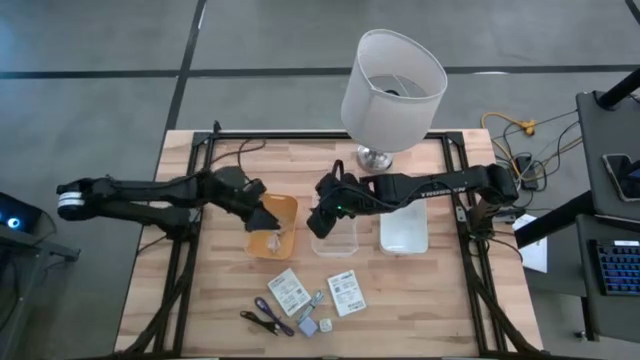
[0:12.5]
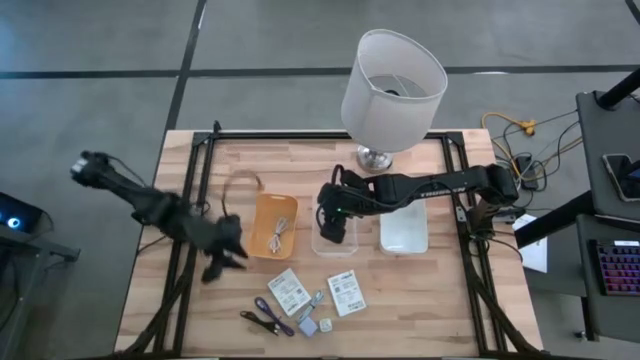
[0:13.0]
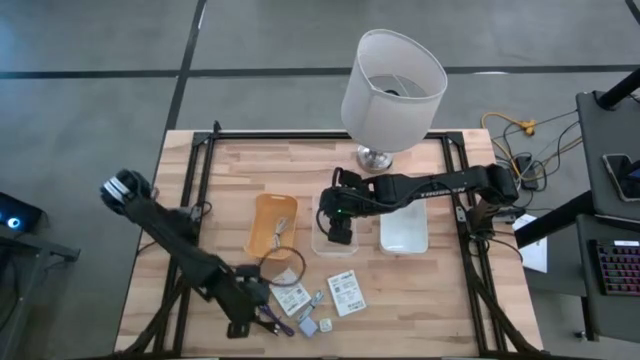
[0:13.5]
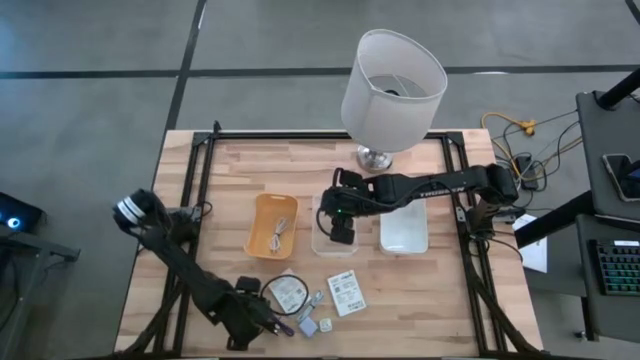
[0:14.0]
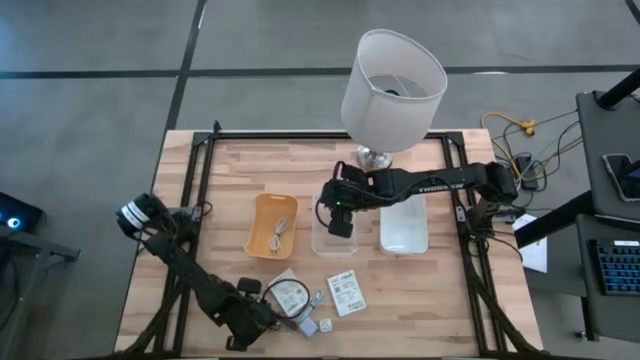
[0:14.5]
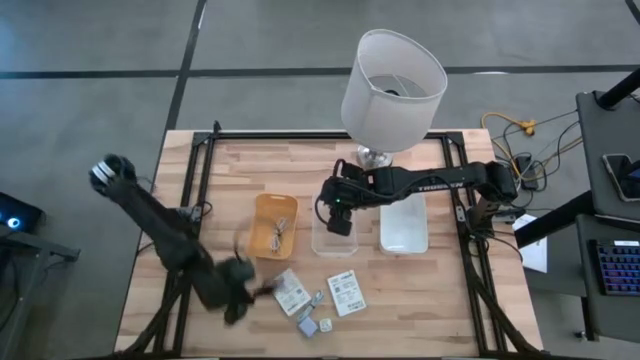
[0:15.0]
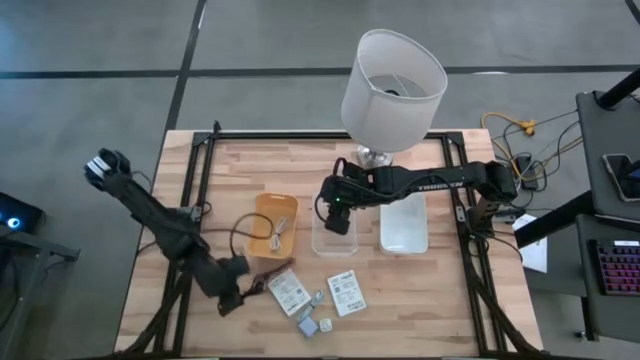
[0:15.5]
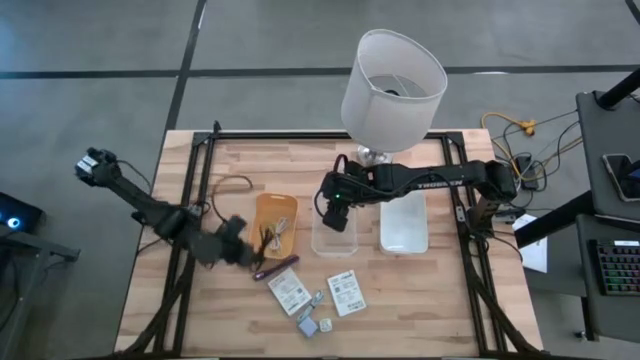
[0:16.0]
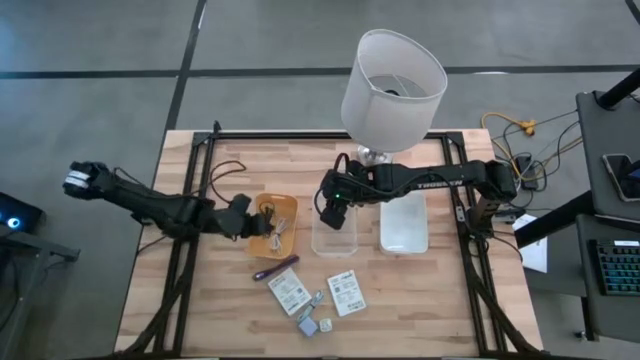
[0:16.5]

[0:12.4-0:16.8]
Task: Pick and place items into bin
Put the black charger cable into the yellow bin

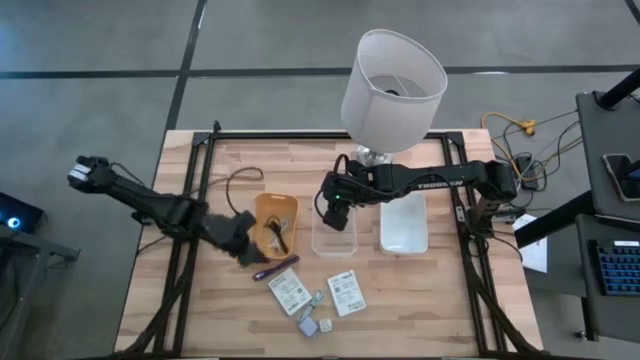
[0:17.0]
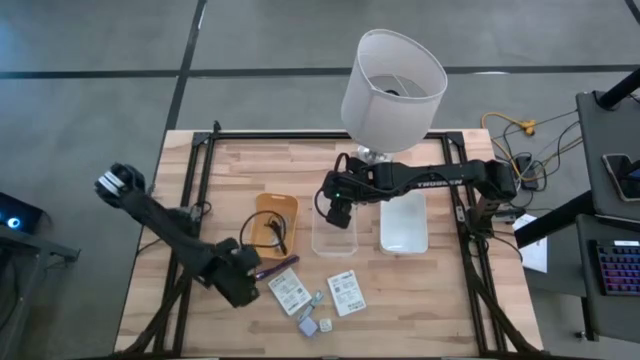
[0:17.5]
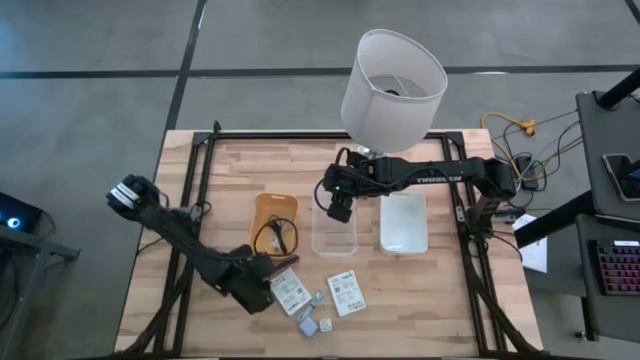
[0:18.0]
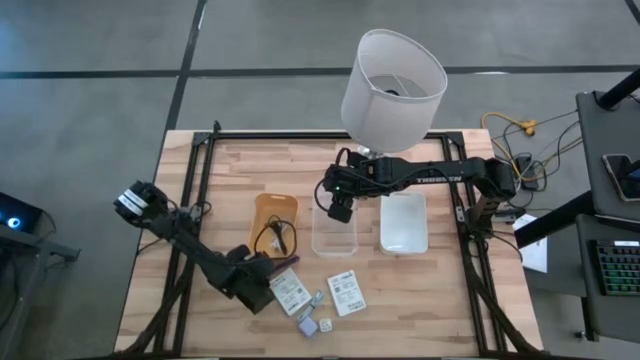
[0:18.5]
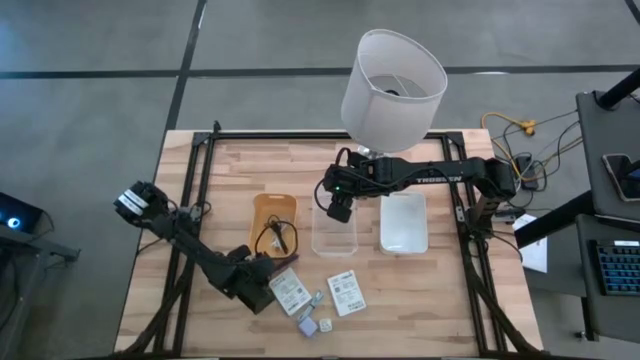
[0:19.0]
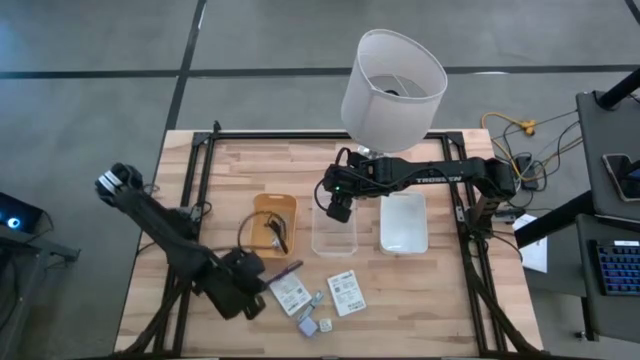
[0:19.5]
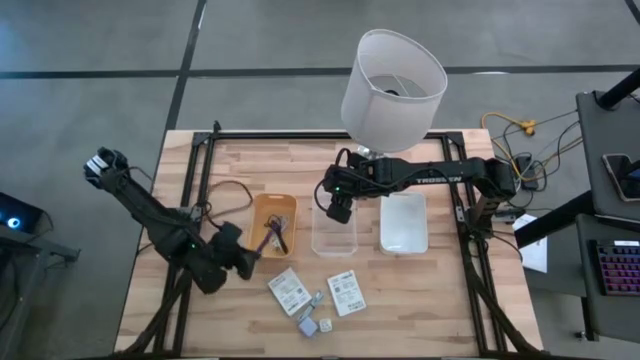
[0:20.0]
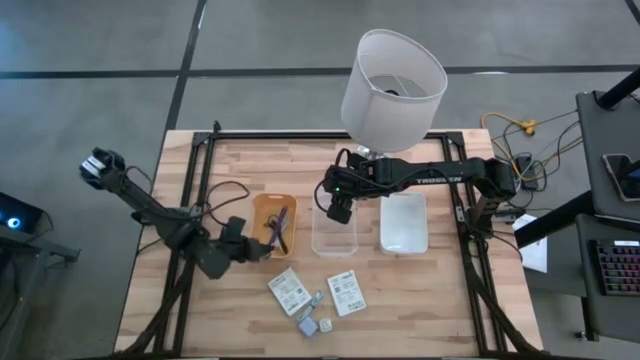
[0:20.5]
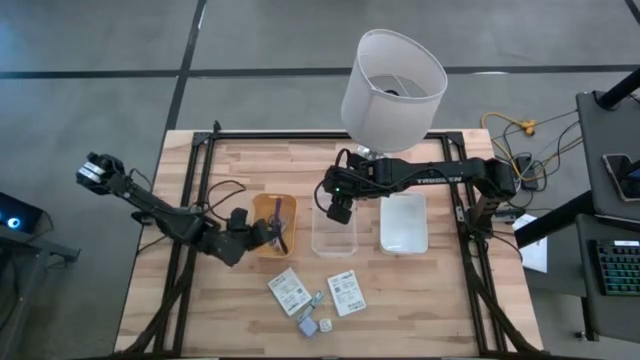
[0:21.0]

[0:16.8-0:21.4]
Put the blue charger cable into the yellow bin

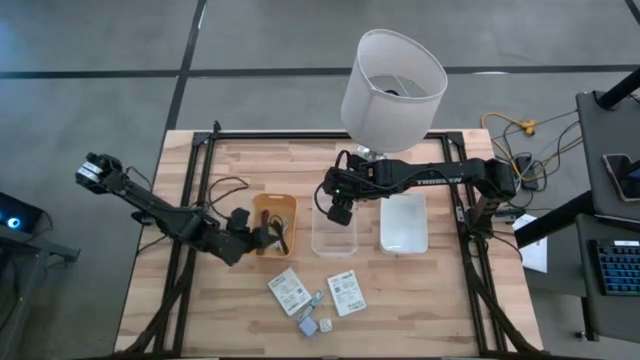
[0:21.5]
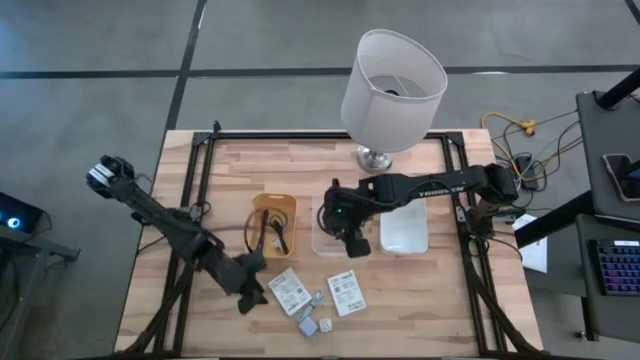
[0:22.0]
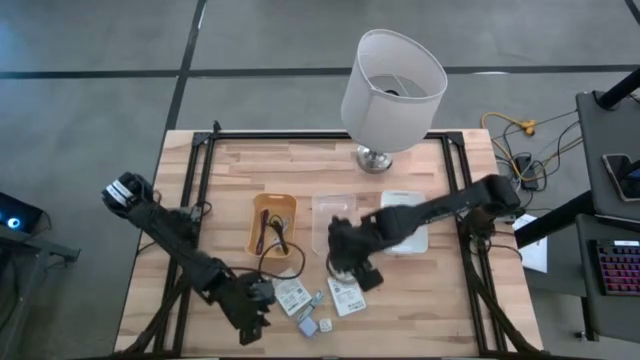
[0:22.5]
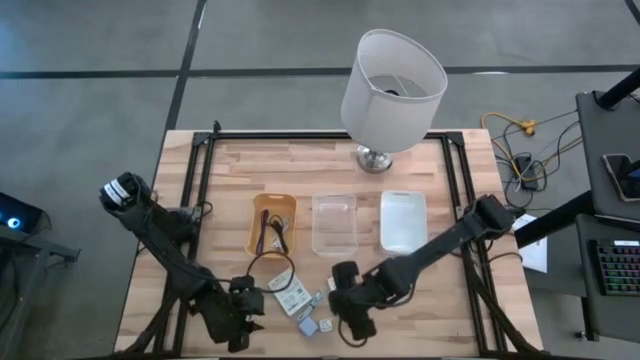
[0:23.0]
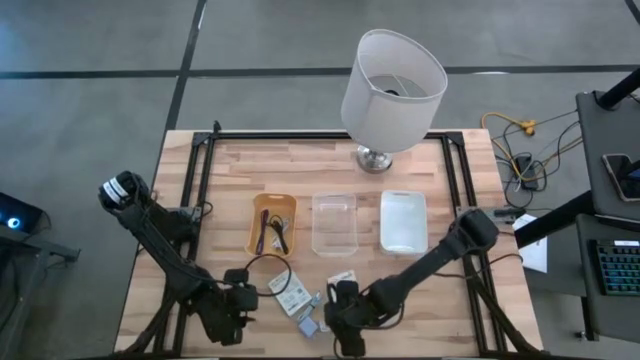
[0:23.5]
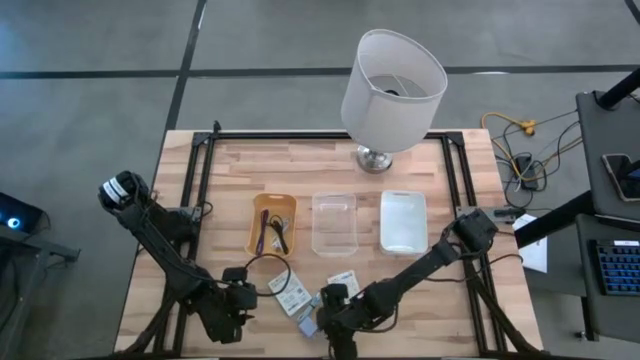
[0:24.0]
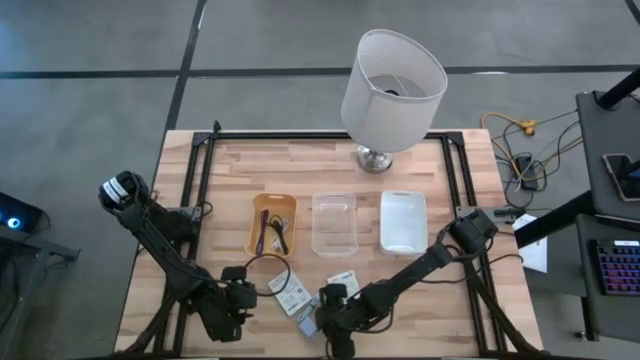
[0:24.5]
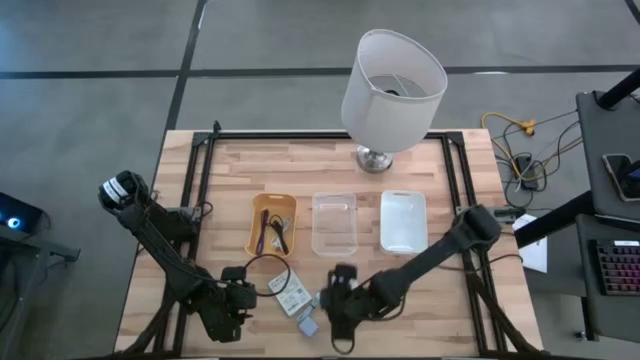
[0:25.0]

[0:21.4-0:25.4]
Put the green charger adapter into the white transparent bin

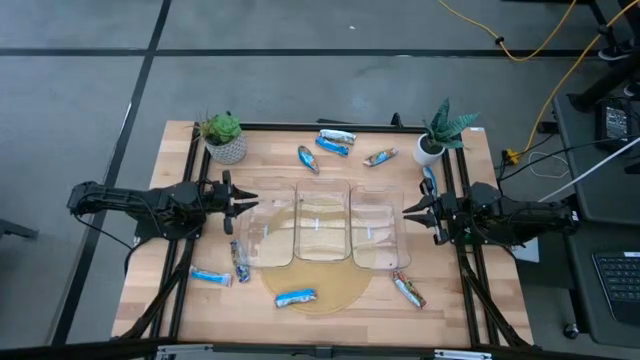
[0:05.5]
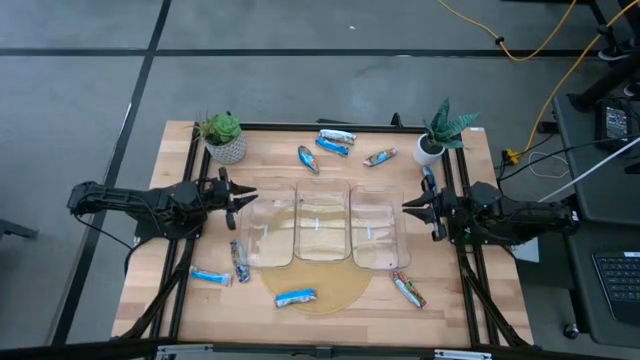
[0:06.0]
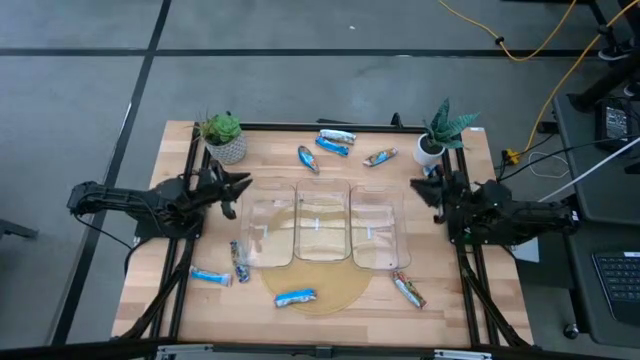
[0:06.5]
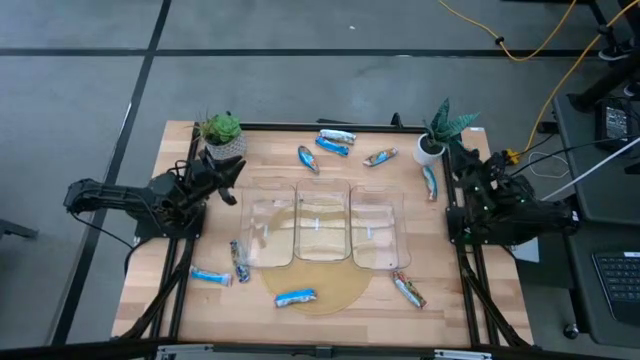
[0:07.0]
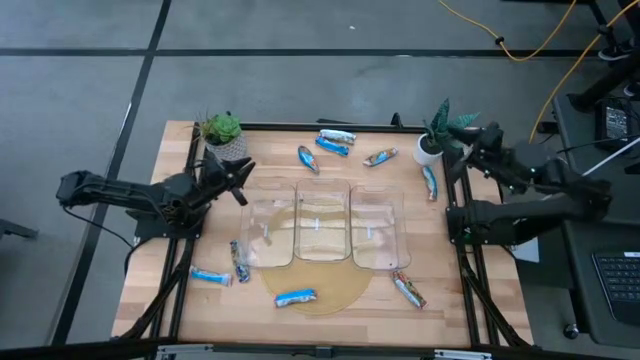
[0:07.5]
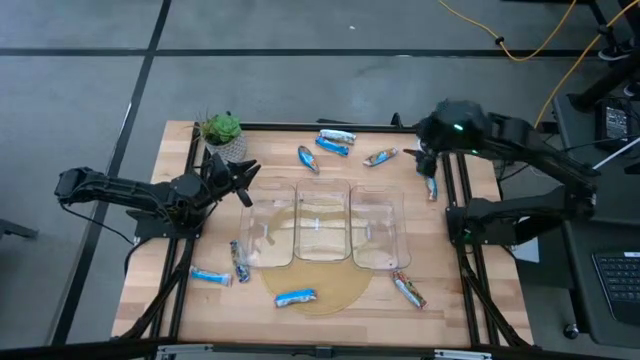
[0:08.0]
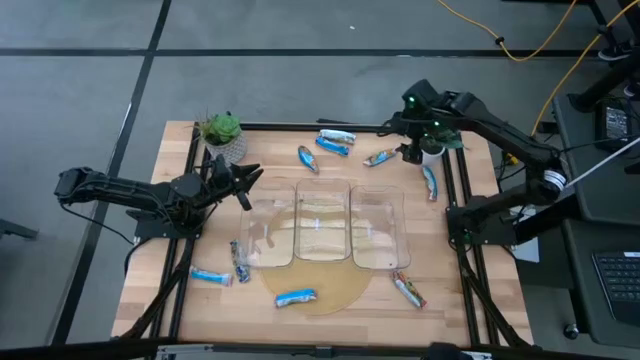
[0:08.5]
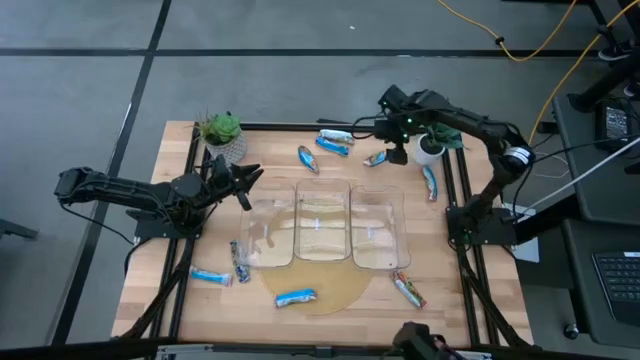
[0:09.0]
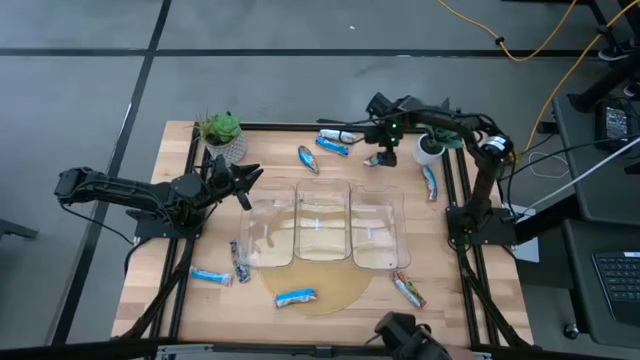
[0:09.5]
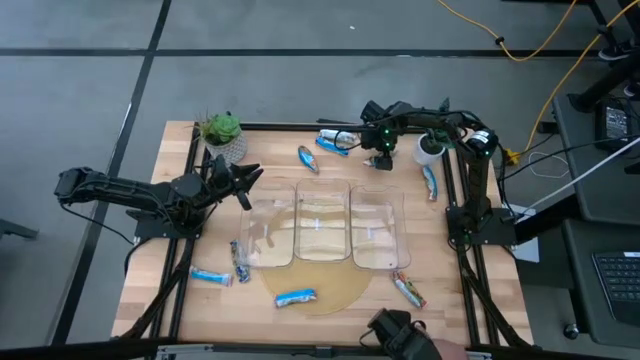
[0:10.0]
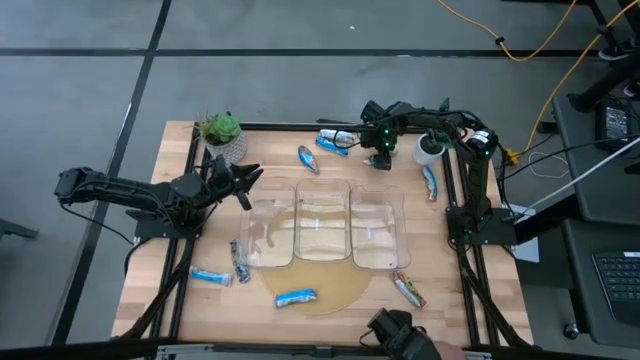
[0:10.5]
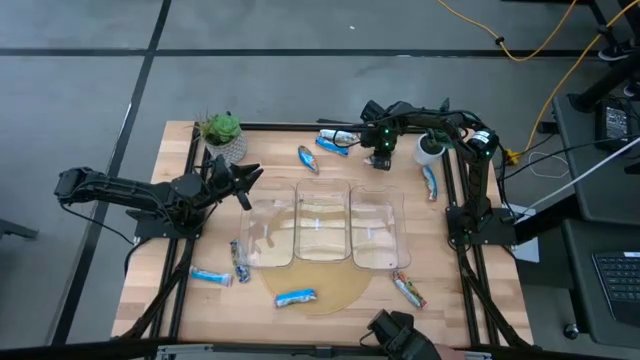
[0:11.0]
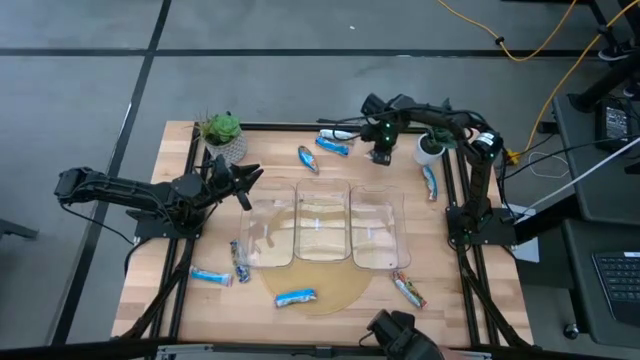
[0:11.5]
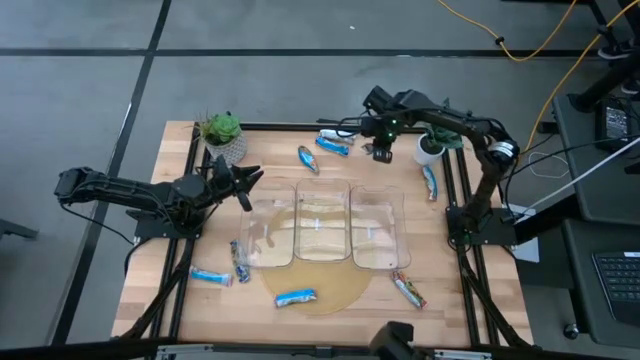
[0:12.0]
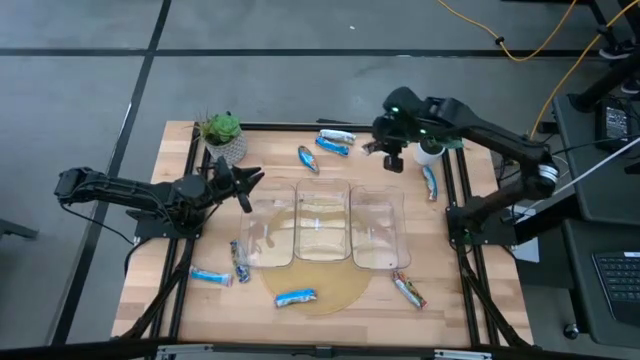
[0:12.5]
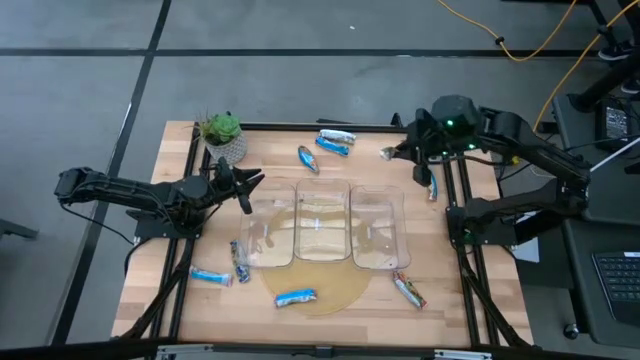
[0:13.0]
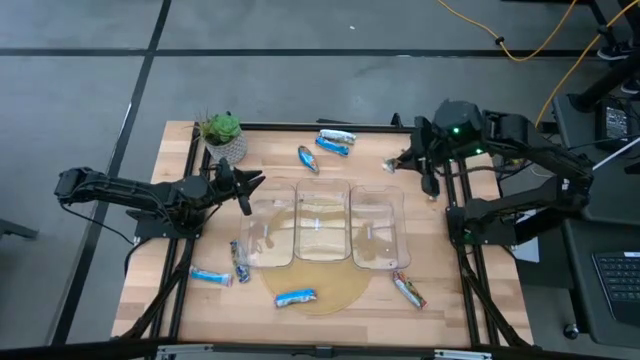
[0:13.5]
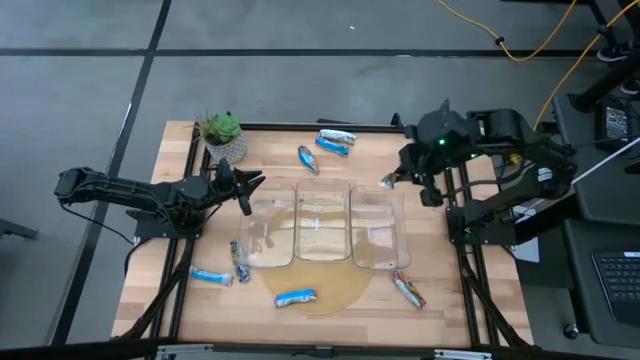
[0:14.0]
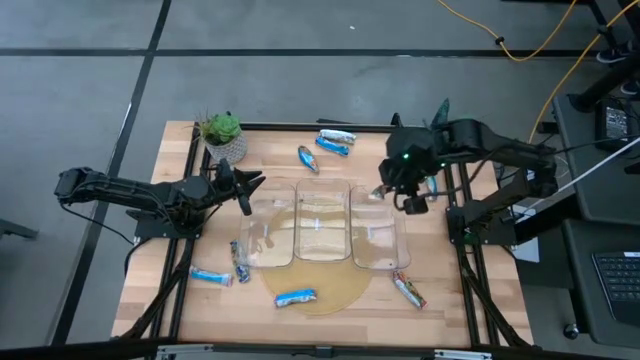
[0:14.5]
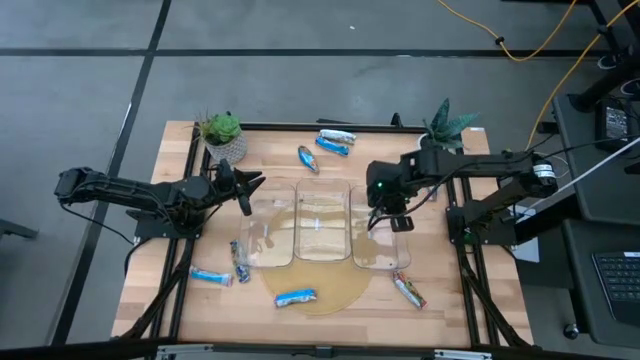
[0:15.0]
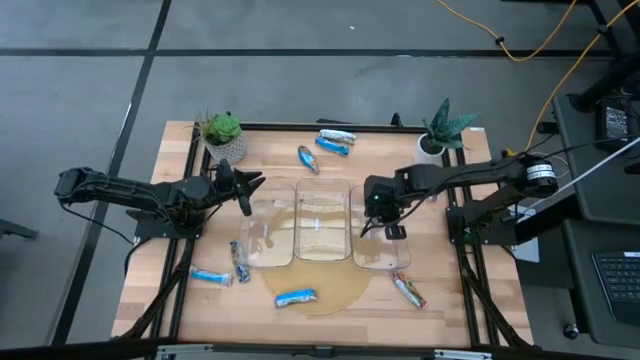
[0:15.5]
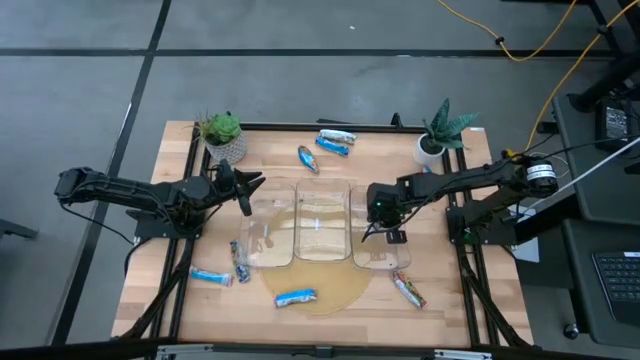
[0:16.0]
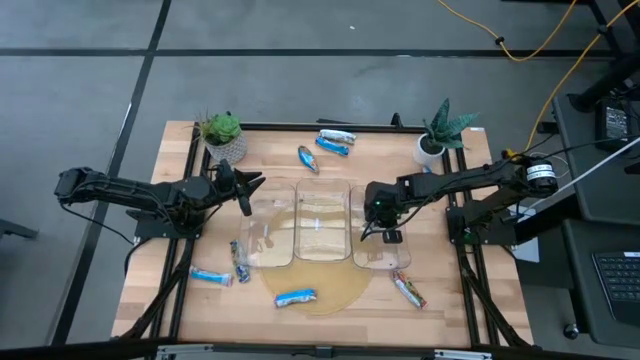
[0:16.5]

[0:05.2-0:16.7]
Task: Pick and place Granola Bars by type
Put the yellow granola bar into the right transparent bin
